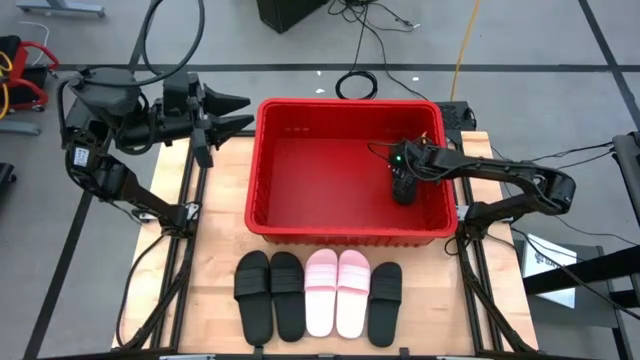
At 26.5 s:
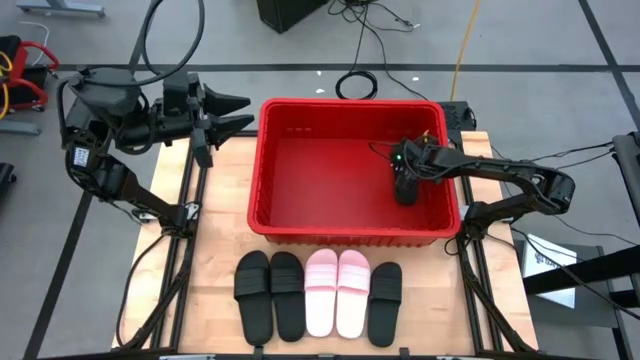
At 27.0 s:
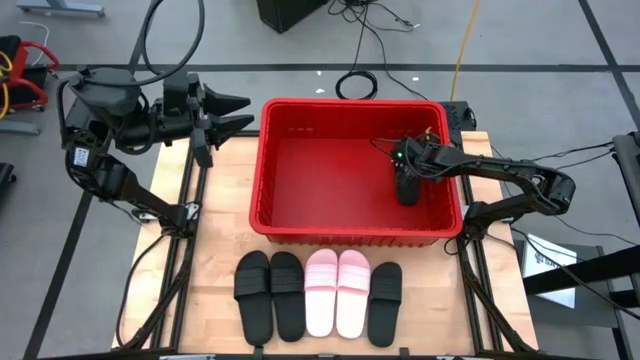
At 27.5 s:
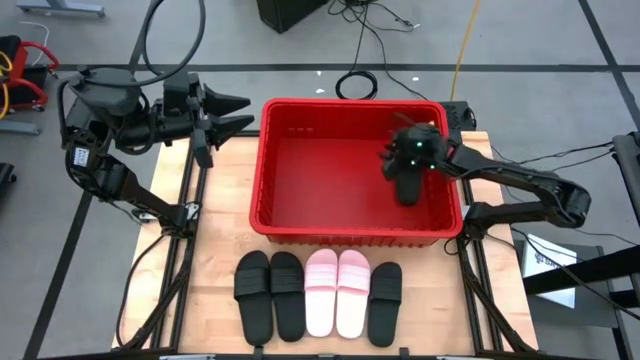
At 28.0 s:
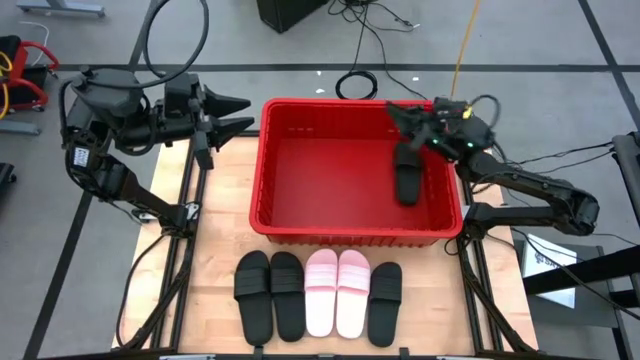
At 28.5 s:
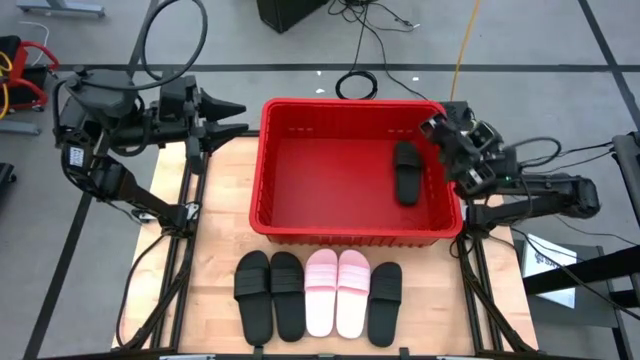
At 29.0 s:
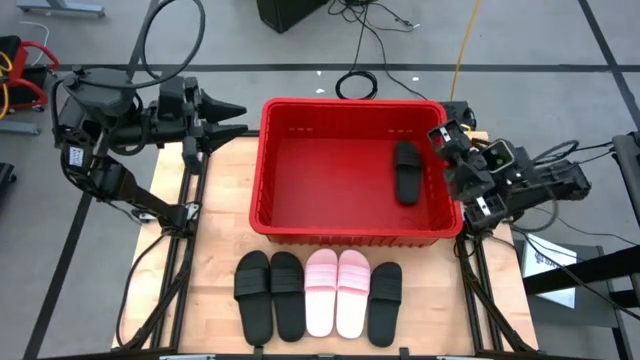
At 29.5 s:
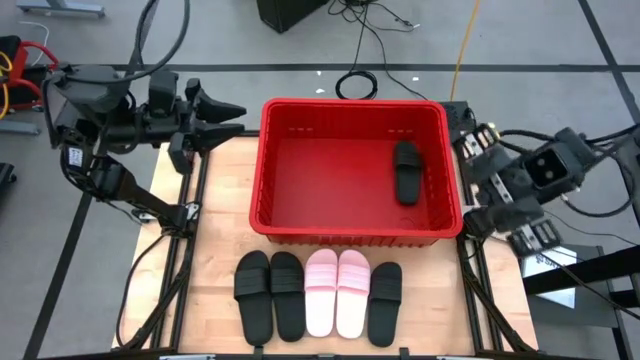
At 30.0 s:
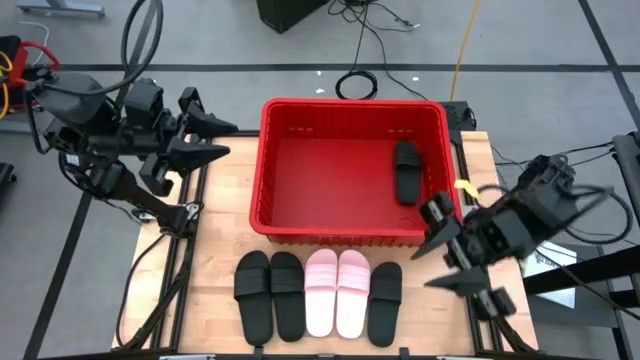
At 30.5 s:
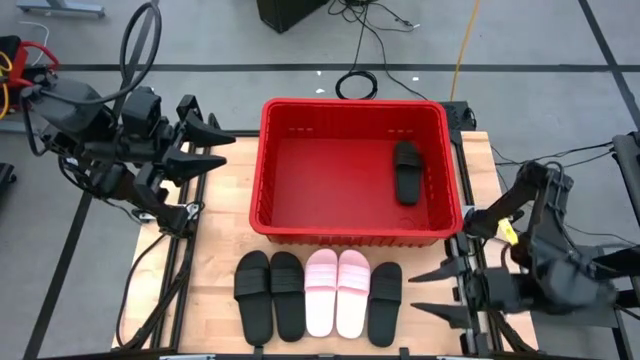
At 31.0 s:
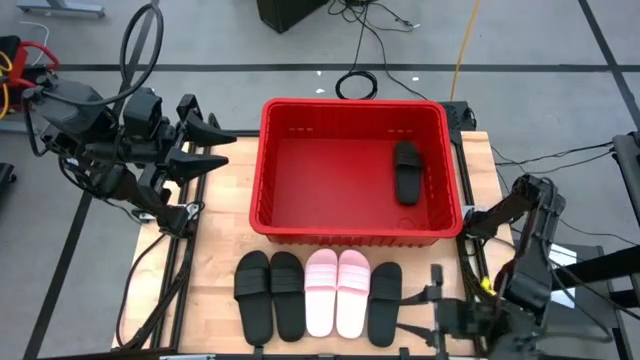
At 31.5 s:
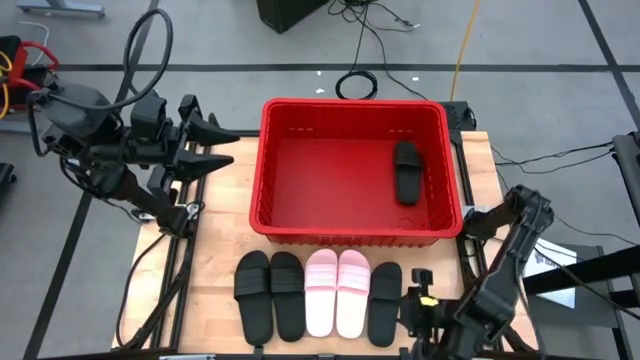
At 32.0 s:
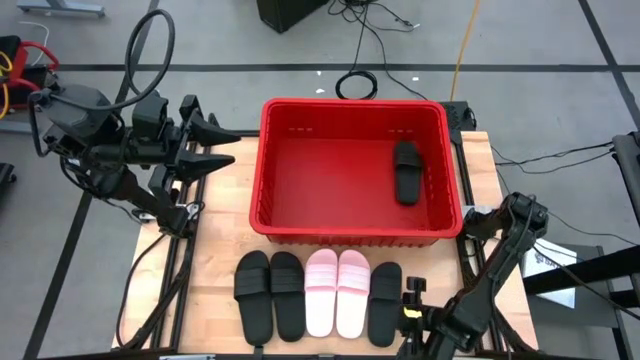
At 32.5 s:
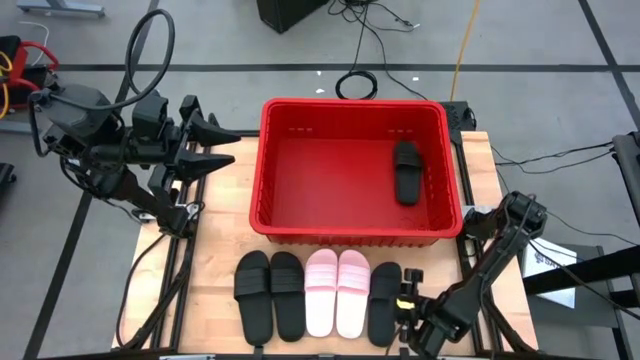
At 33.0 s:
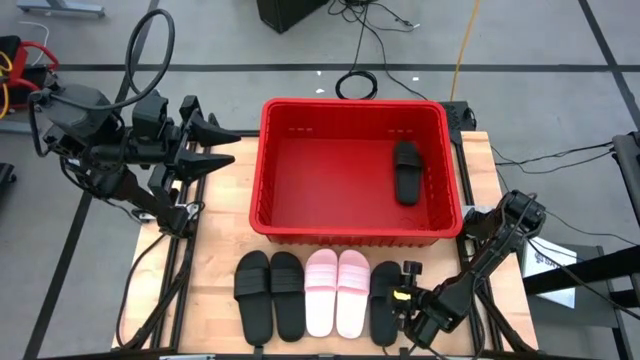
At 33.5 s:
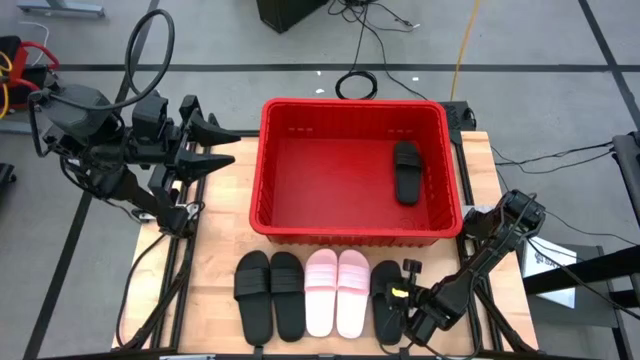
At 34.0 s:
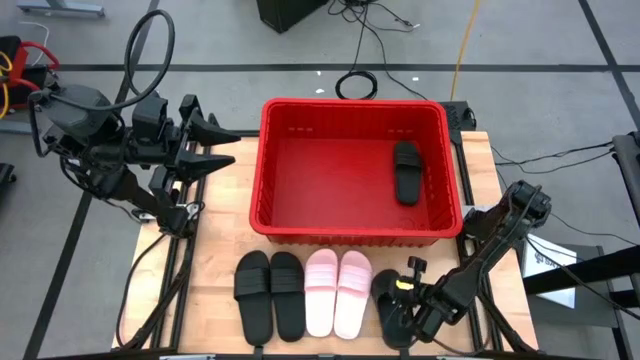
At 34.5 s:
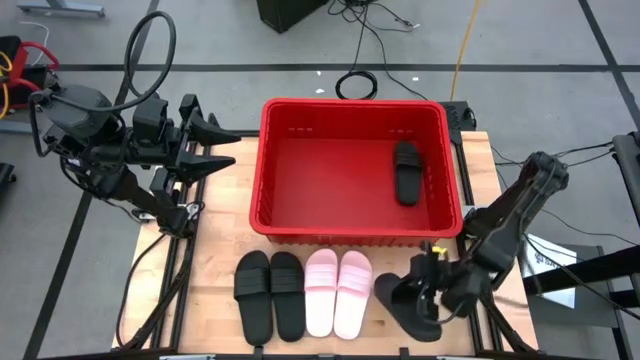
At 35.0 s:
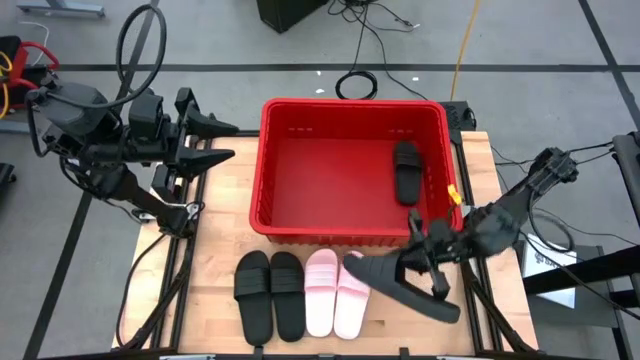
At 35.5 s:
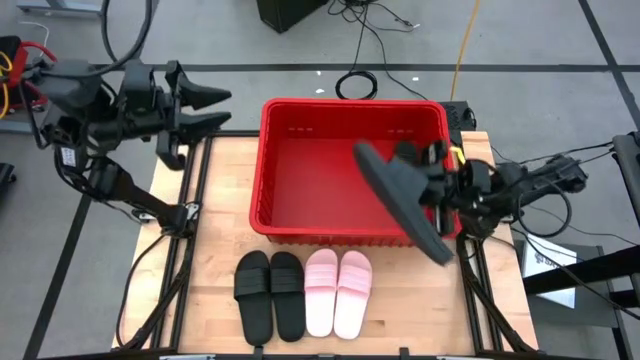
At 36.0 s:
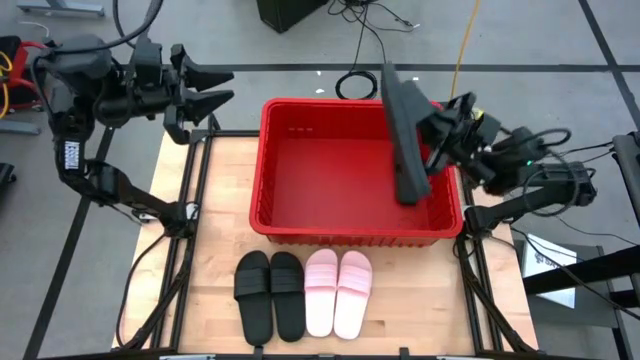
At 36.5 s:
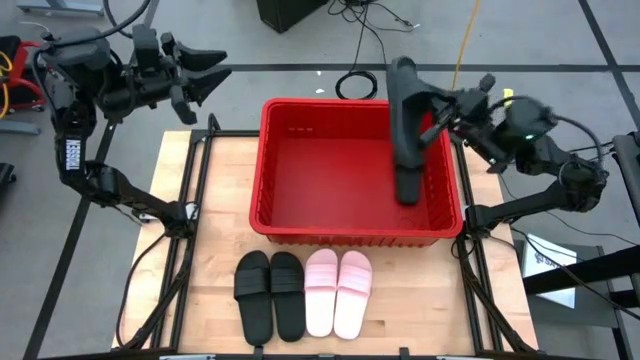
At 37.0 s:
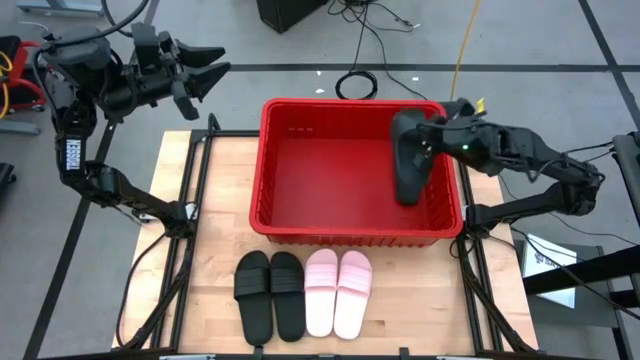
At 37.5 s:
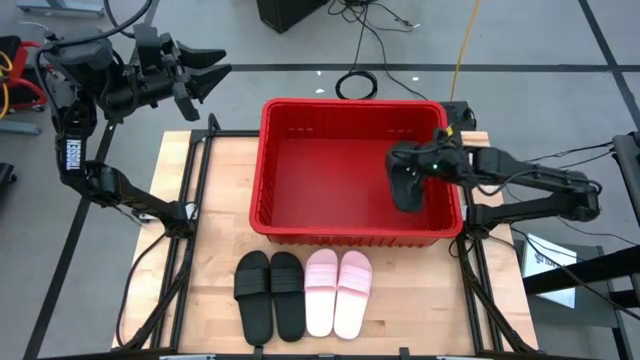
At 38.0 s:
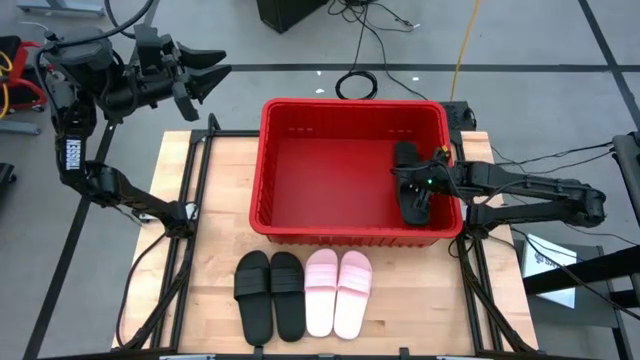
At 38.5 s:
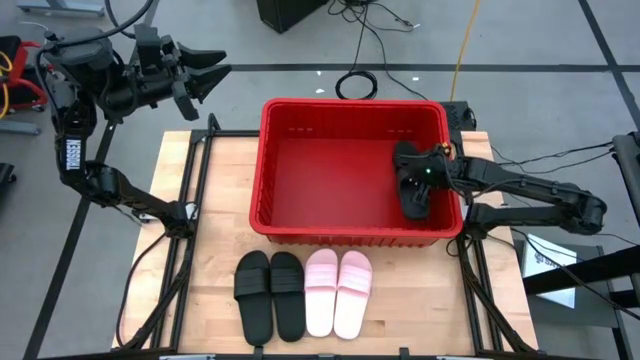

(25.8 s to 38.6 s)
Task: Pick and place slides into bin
Put the black slipper into the red bin
